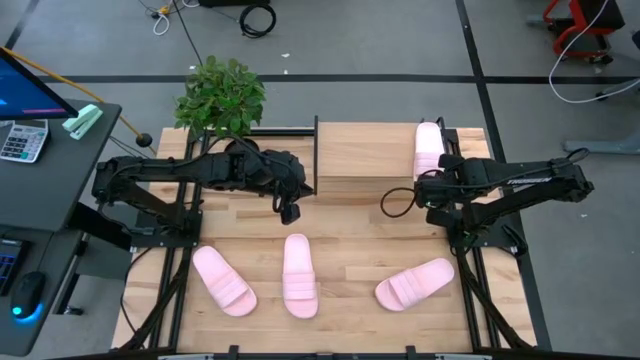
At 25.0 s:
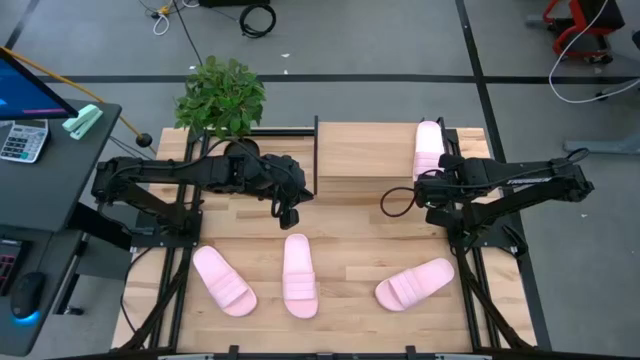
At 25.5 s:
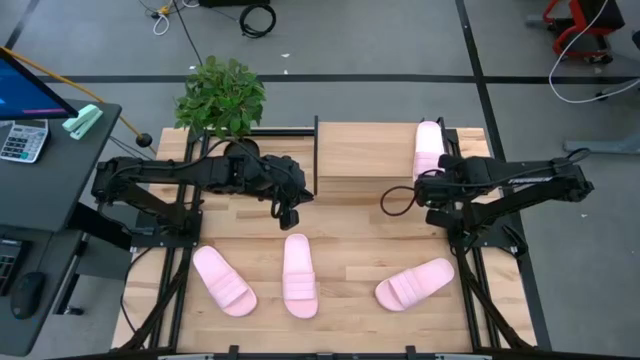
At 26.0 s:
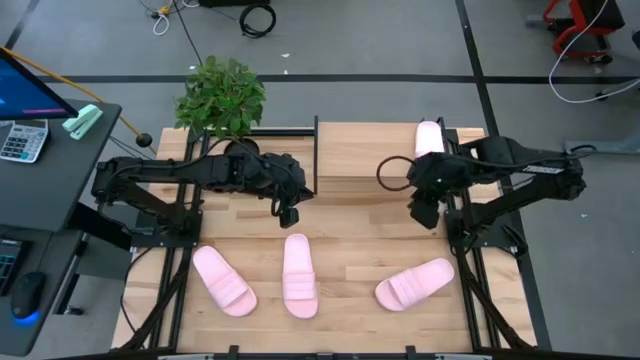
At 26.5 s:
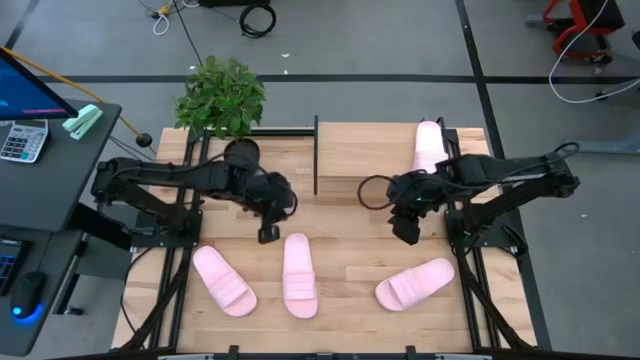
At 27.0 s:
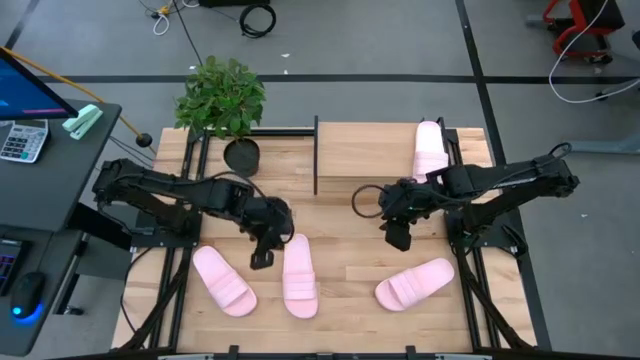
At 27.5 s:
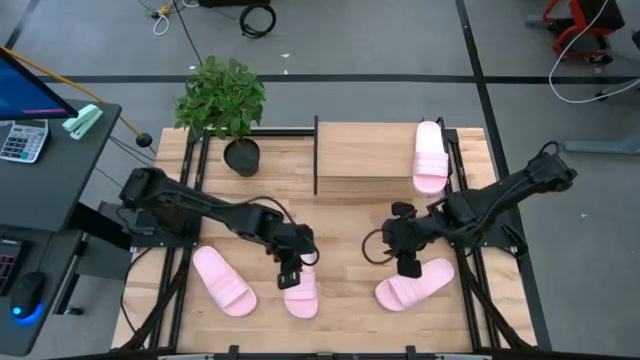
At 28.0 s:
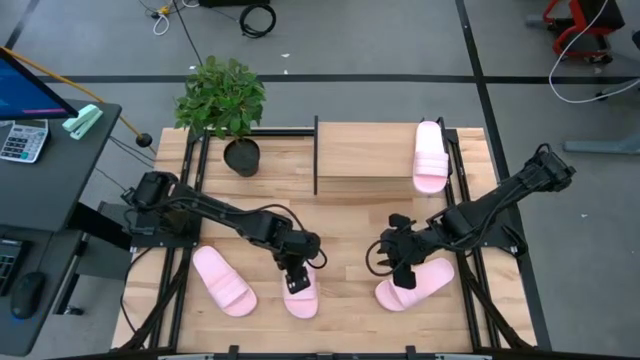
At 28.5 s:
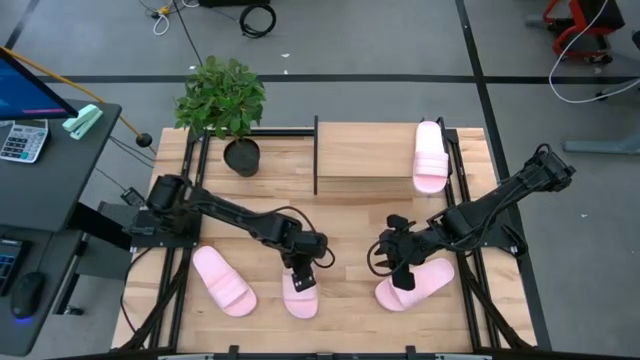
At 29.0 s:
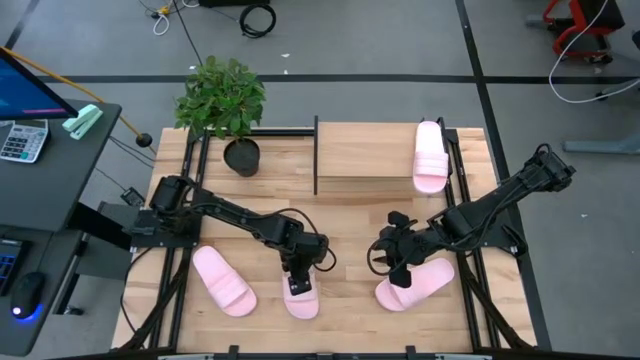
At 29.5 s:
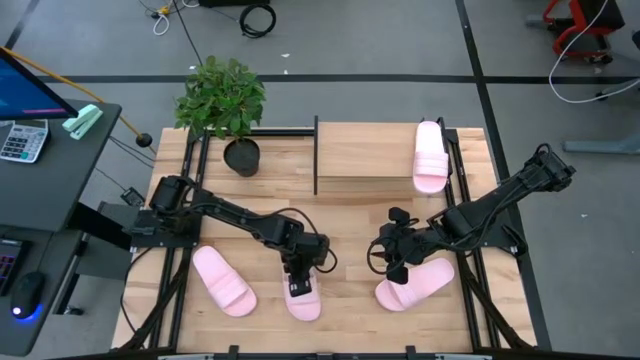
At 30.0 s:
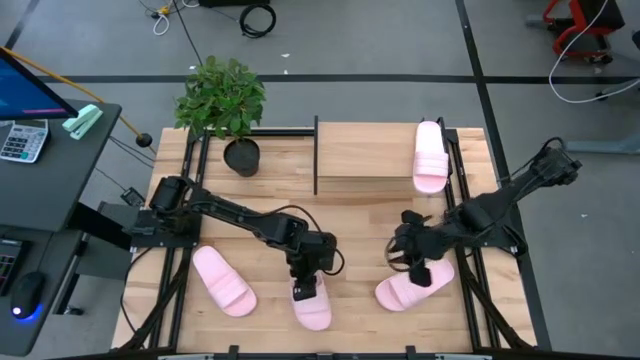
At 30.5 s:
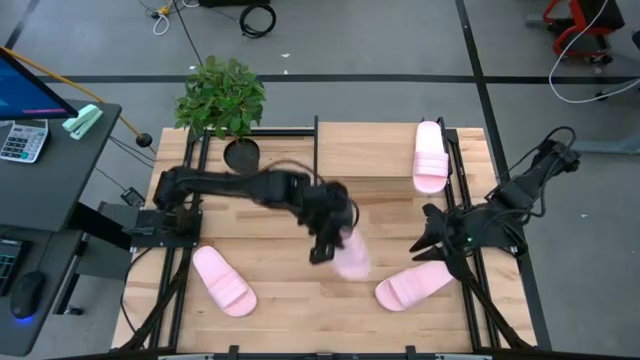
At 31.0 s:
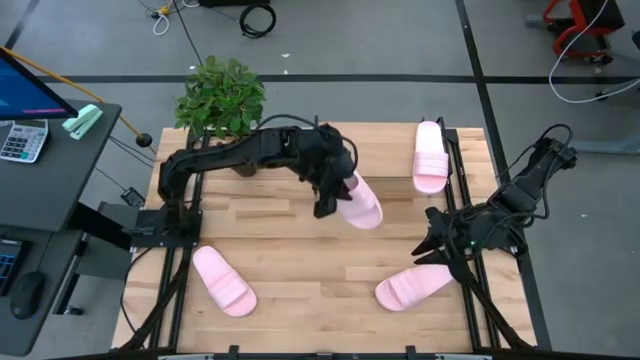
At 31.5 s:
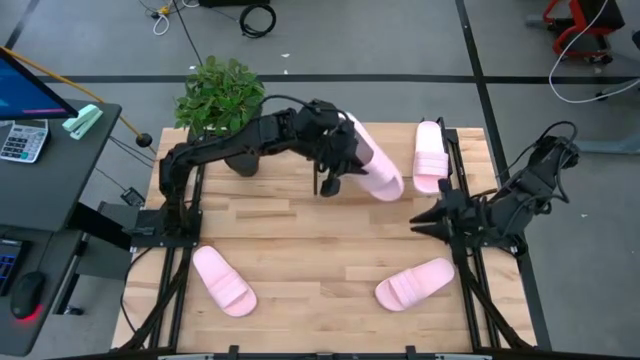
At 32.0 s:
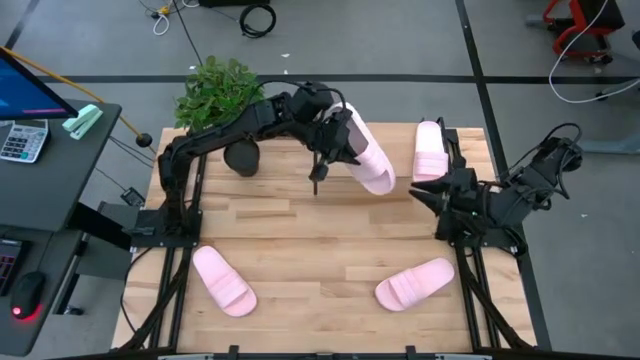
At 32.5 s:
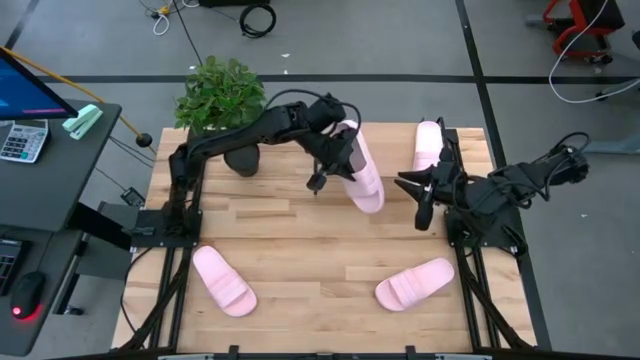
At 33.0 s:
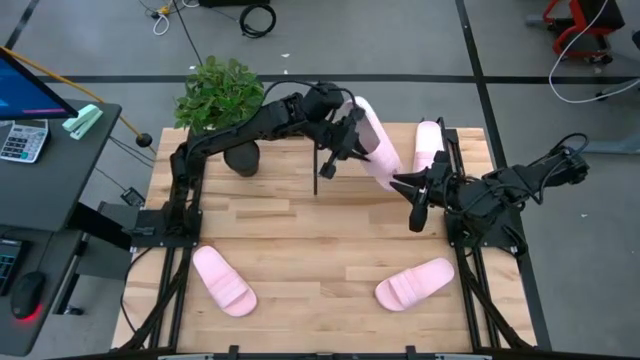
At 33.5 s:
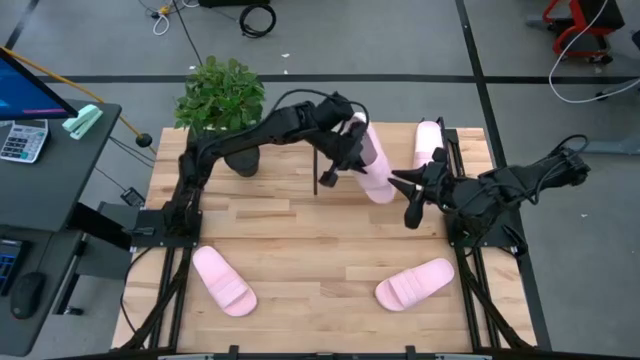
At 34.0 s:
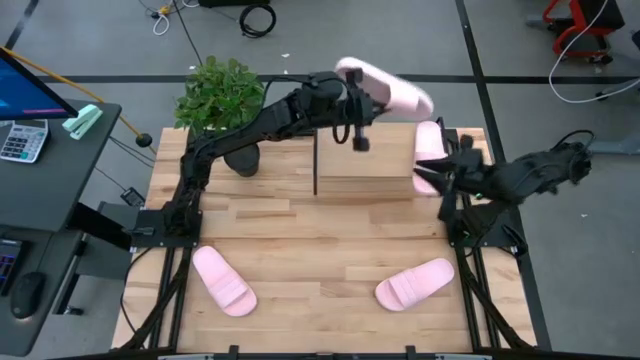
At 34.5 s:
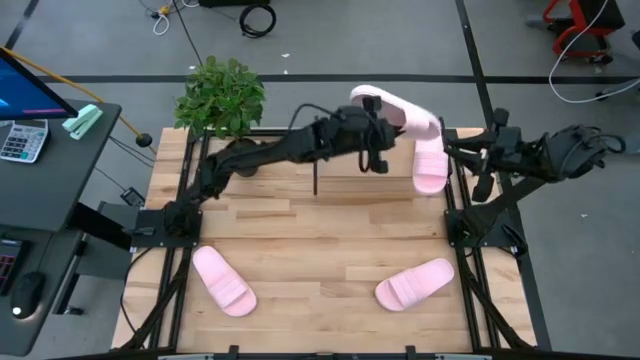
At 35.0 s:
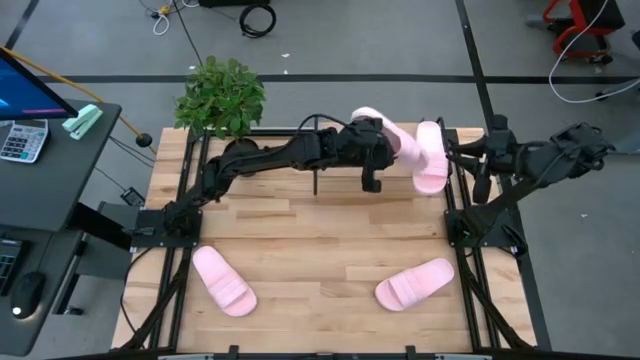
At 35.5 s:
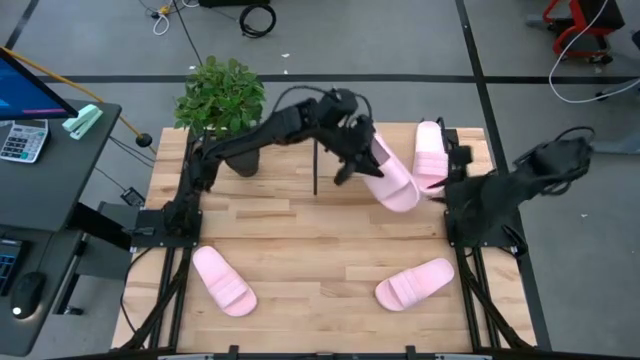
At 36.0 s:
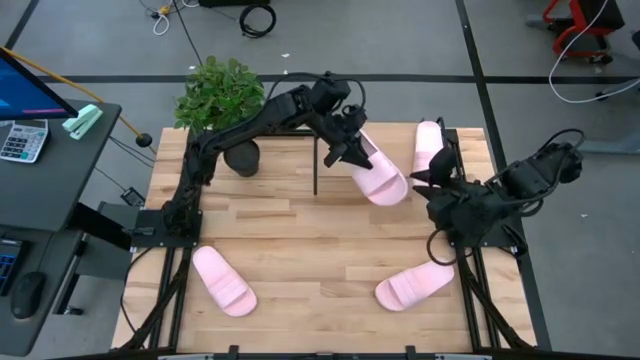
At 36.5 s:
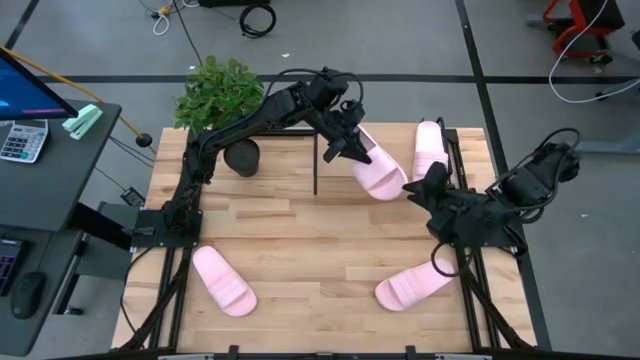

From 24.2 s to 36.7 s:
Task: Pick and place slides into the shelf
Put the middle pink slide on the shelf

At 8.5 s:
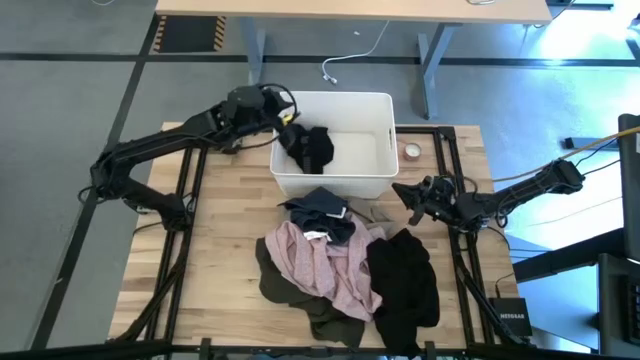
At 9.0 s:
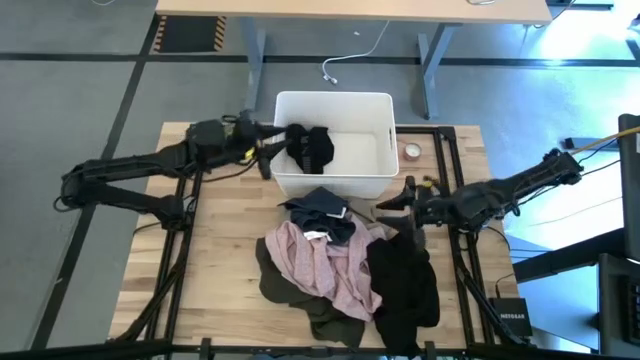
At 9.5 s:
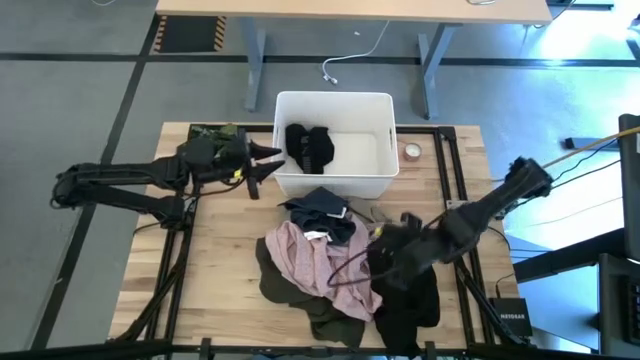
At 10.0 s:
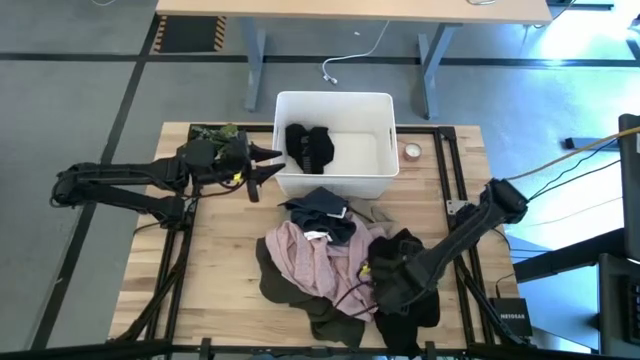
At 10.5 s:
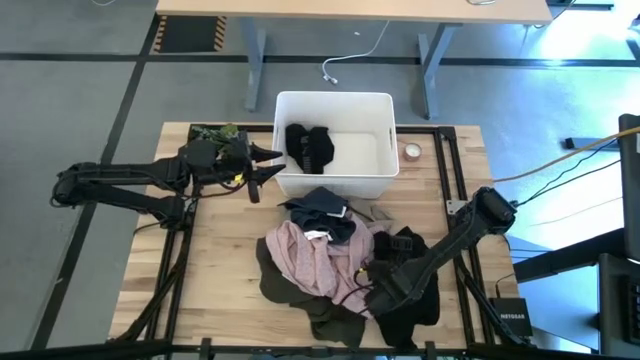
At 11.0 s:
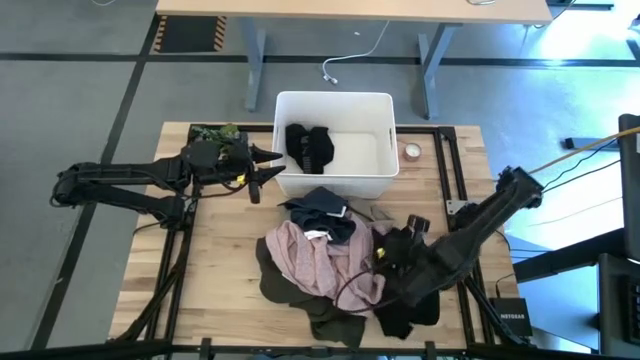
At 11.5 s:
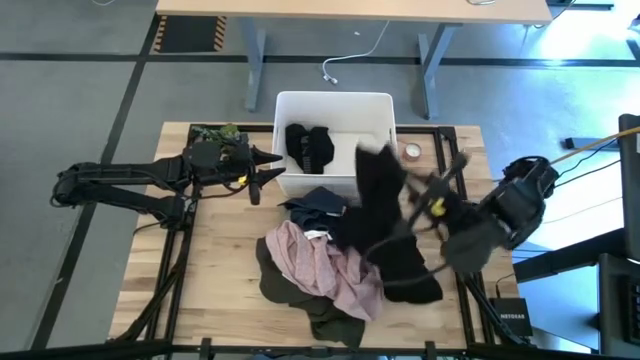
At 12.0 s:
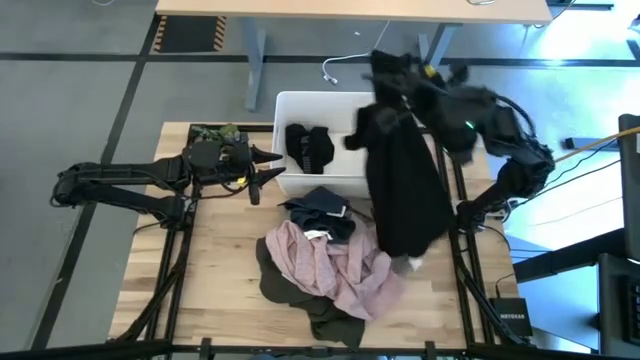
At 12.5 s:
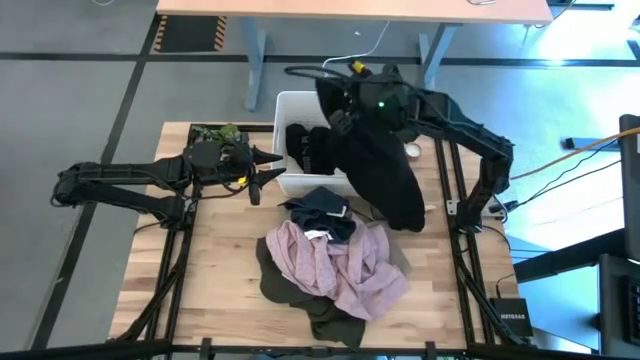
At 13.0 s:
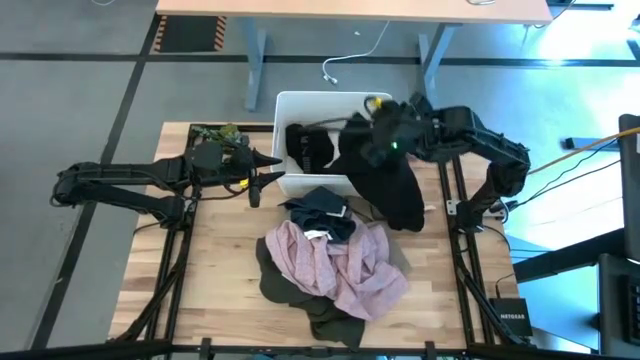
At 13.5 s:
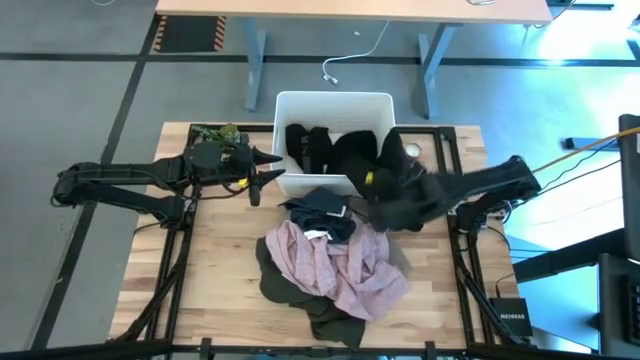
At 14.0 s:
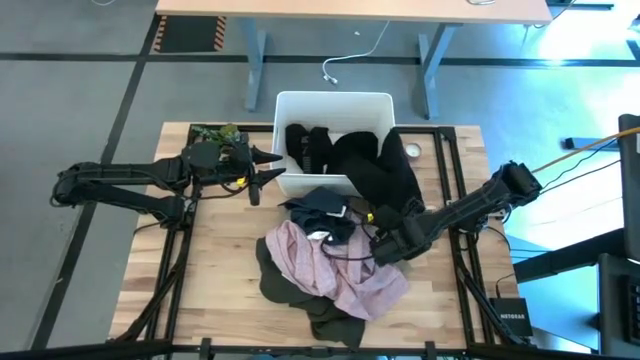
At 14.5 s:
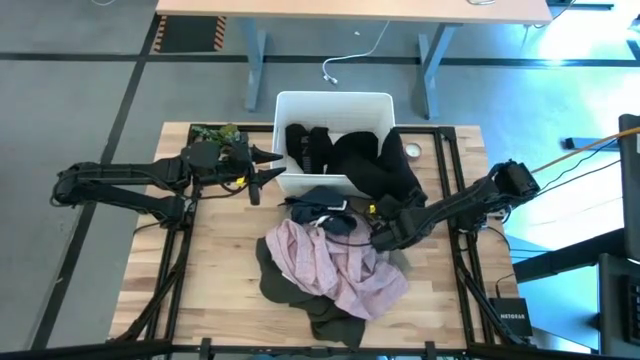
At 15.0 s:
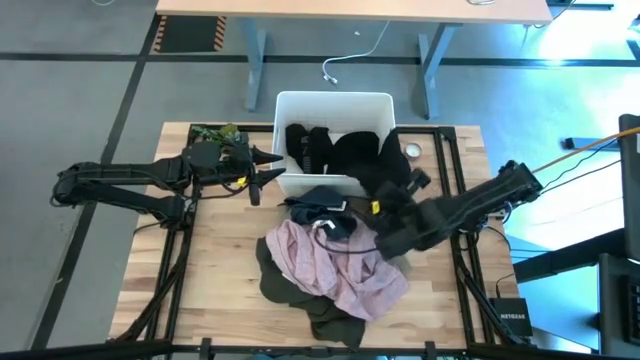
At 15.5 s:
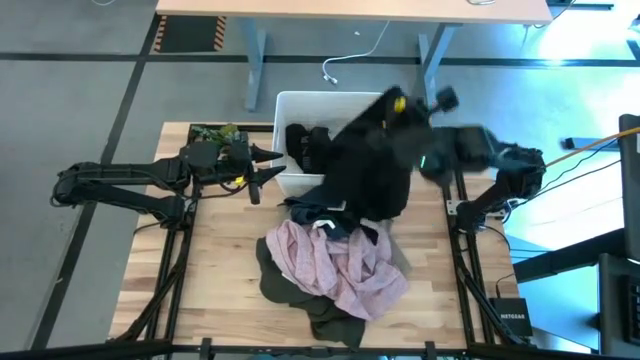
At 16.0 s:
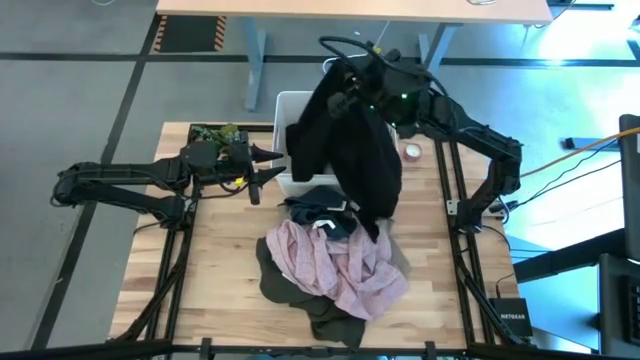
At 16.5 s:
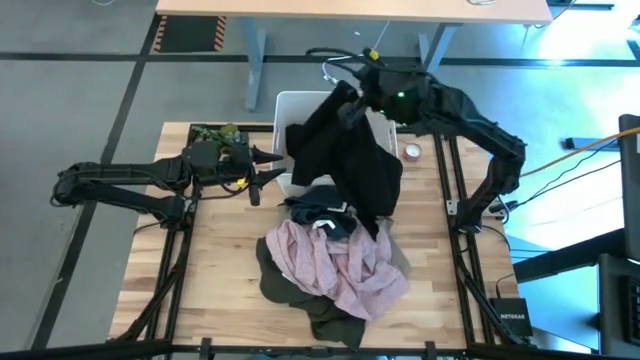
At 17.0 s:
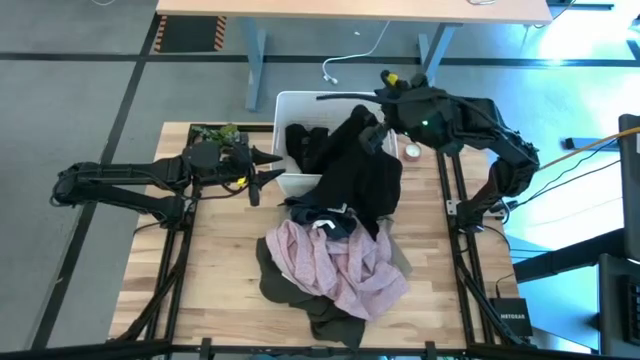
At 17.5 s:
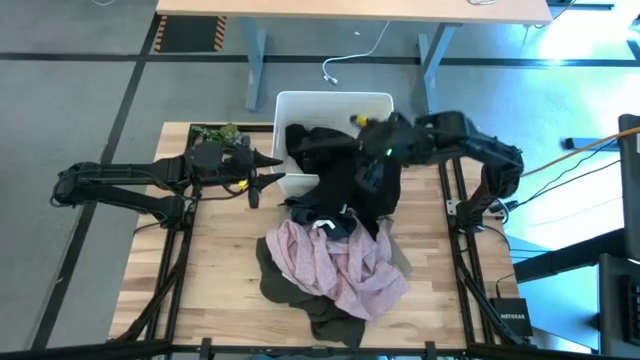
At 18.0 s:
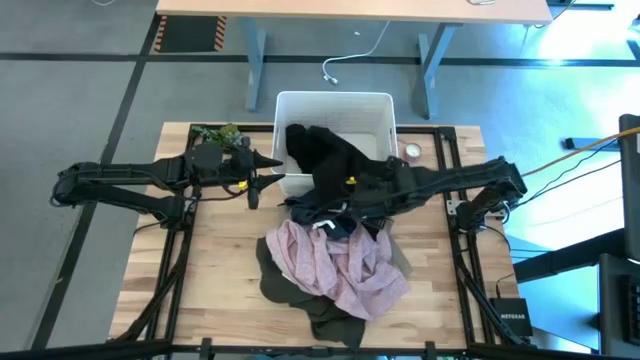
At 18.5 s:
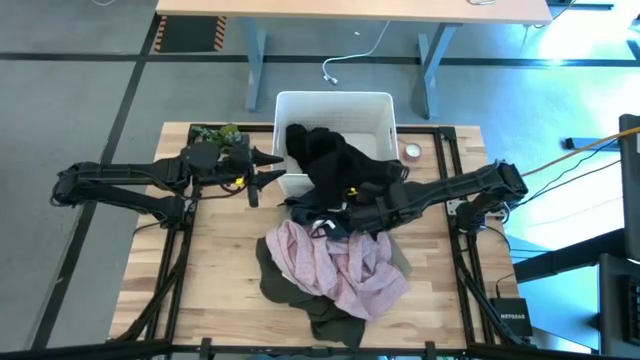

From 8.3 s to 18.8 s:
Task: Sort clothes
Put the black shirt into the white laundry bin

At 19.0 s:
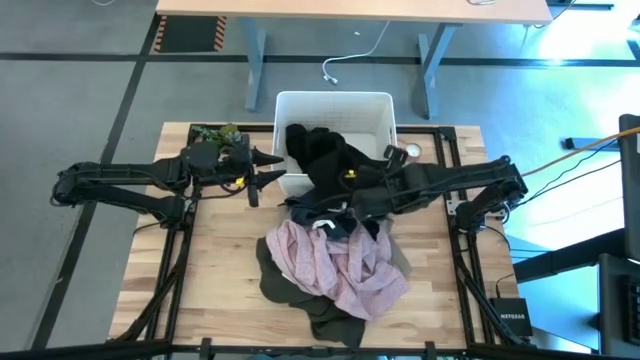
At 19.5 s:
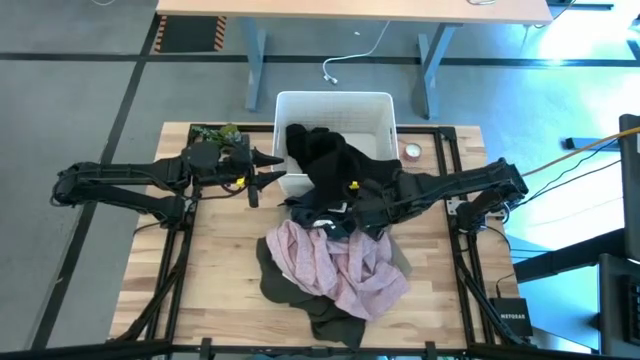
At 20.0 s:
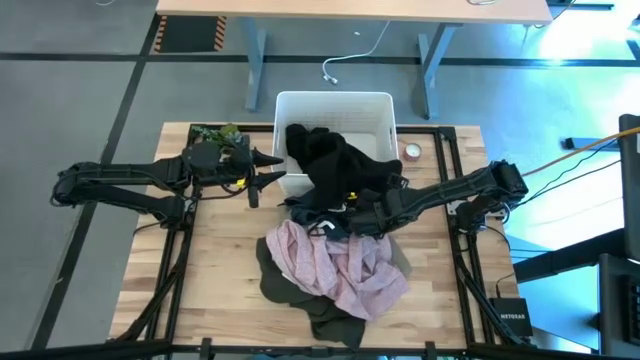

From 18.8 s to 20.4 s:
Put the black shirt into the white laundry bin
